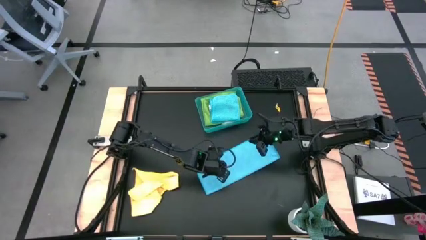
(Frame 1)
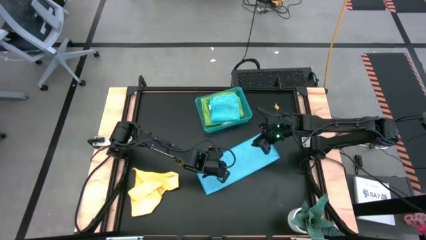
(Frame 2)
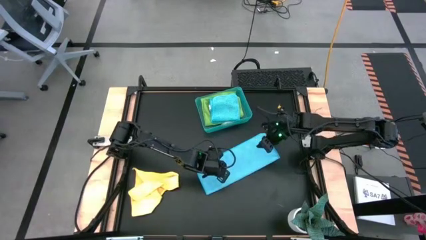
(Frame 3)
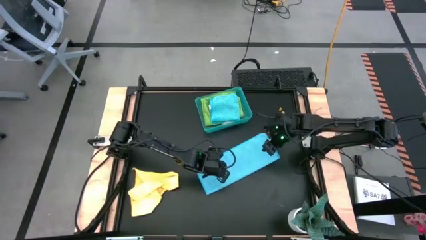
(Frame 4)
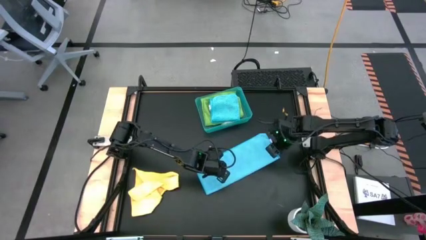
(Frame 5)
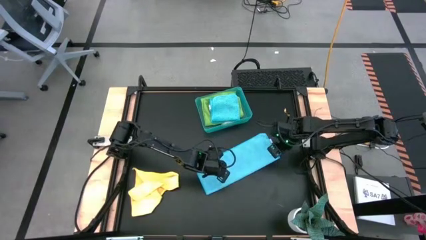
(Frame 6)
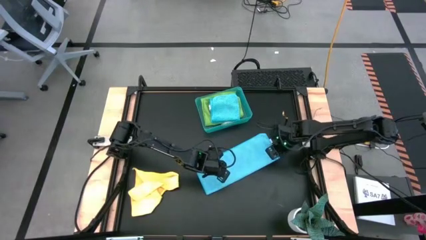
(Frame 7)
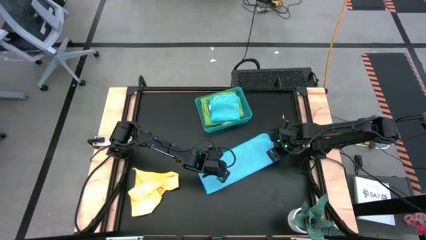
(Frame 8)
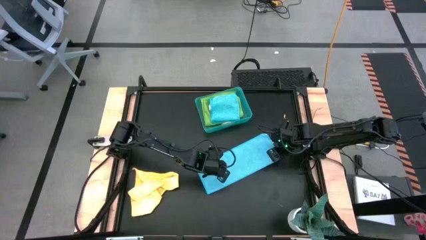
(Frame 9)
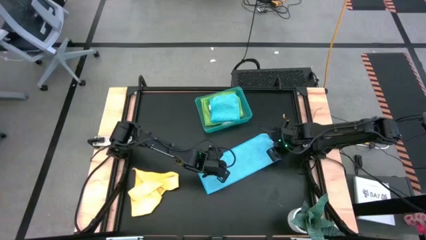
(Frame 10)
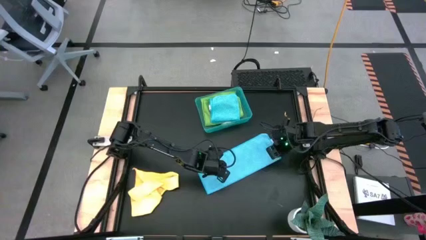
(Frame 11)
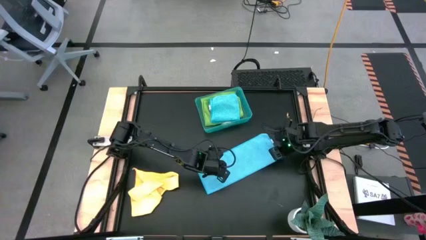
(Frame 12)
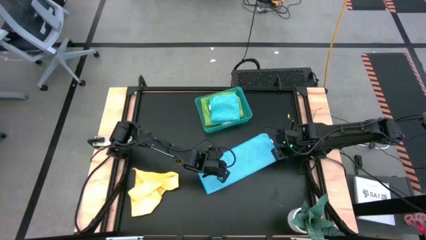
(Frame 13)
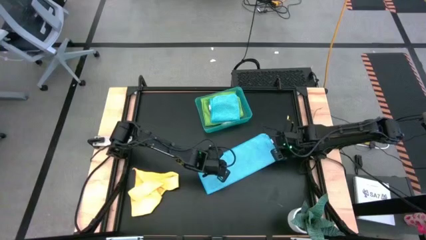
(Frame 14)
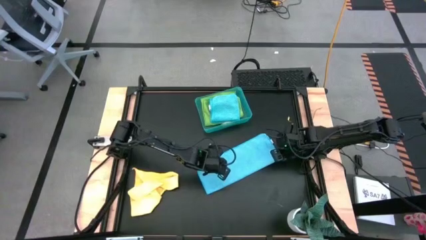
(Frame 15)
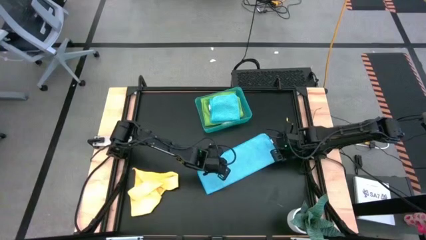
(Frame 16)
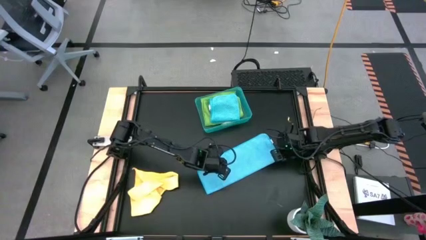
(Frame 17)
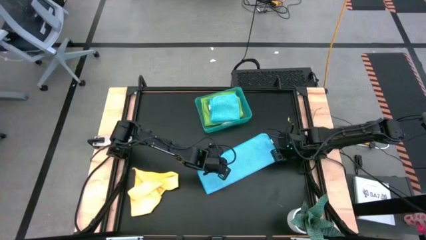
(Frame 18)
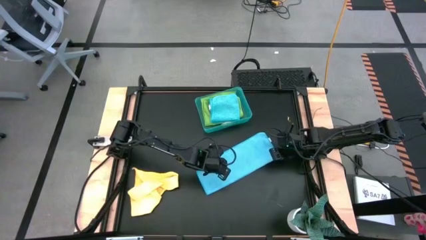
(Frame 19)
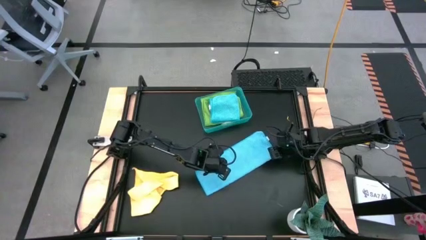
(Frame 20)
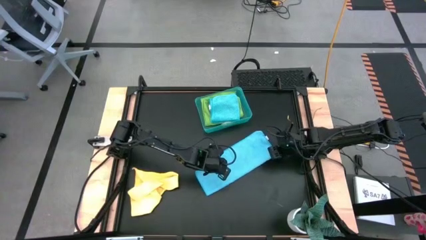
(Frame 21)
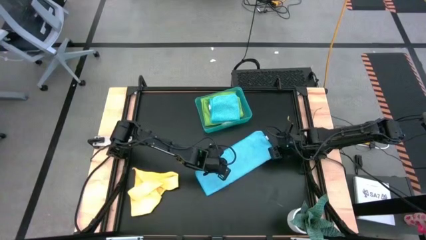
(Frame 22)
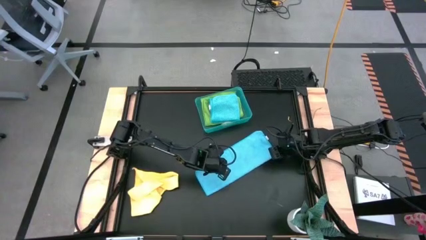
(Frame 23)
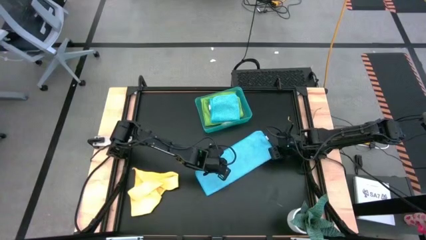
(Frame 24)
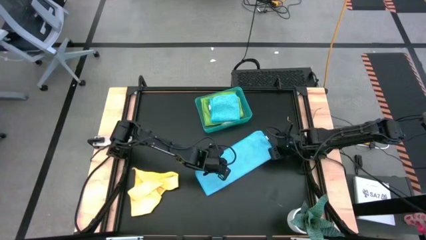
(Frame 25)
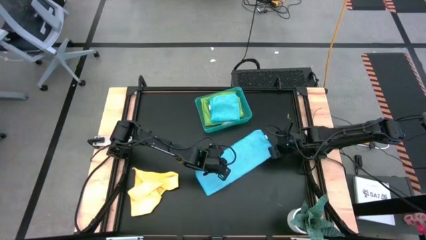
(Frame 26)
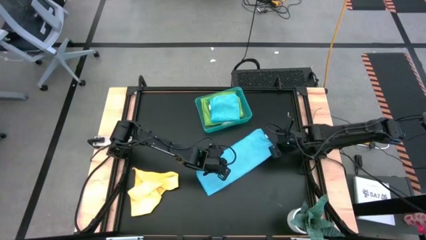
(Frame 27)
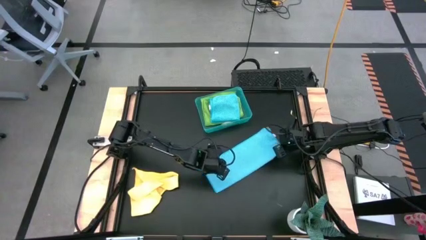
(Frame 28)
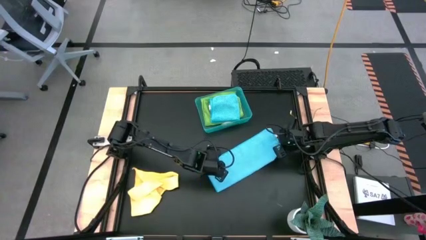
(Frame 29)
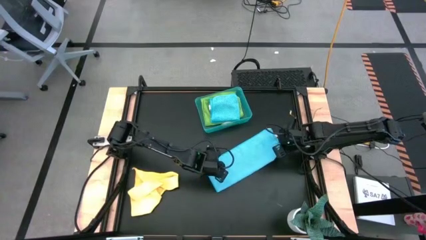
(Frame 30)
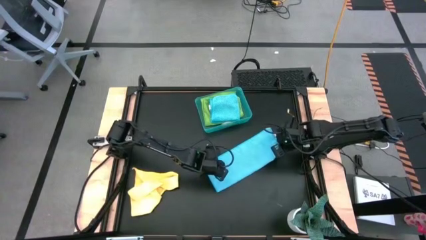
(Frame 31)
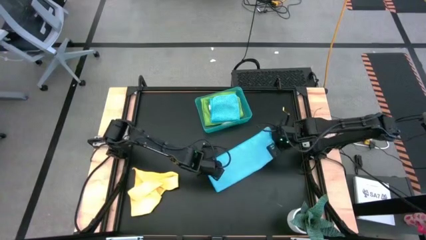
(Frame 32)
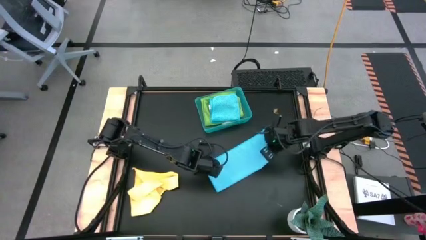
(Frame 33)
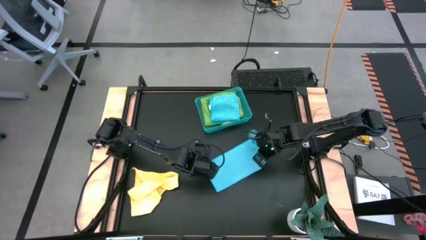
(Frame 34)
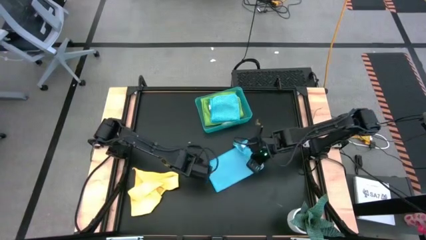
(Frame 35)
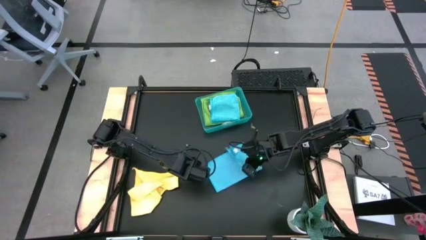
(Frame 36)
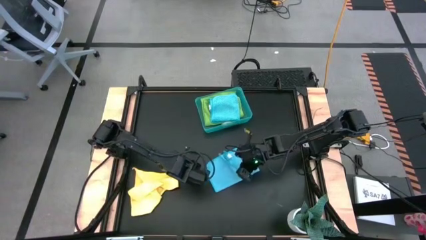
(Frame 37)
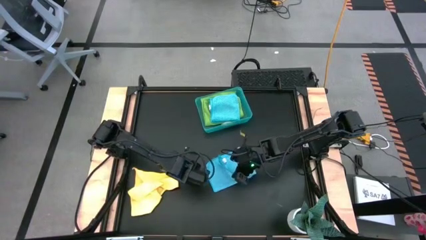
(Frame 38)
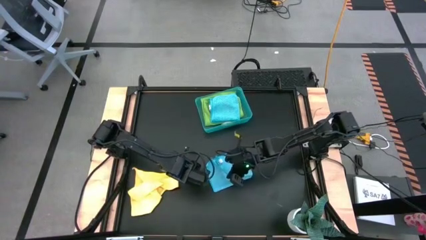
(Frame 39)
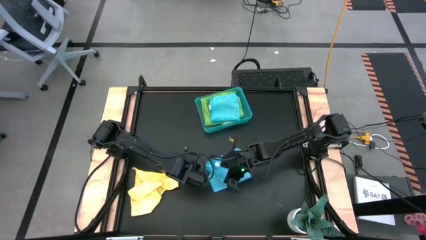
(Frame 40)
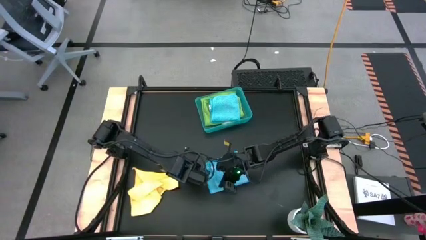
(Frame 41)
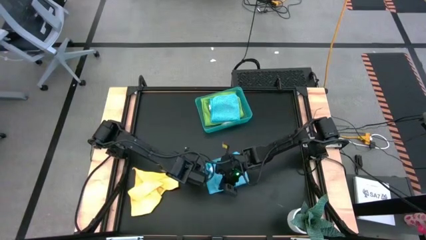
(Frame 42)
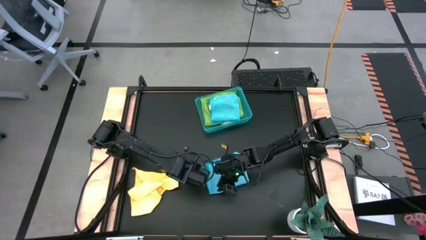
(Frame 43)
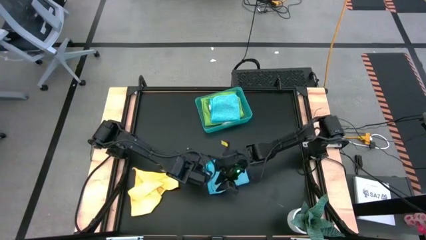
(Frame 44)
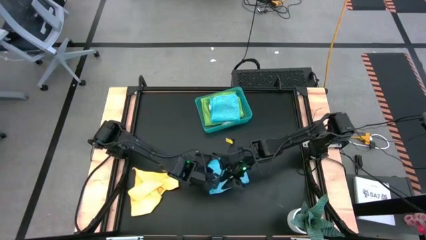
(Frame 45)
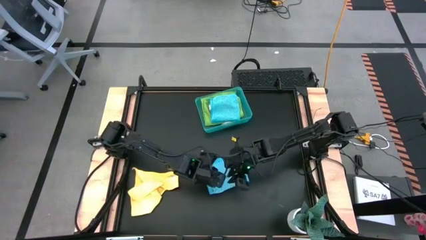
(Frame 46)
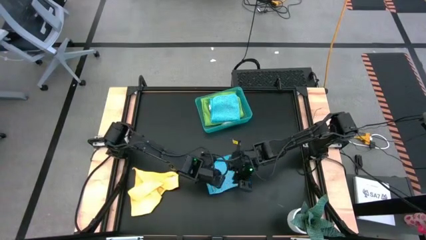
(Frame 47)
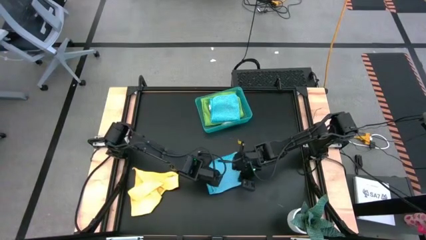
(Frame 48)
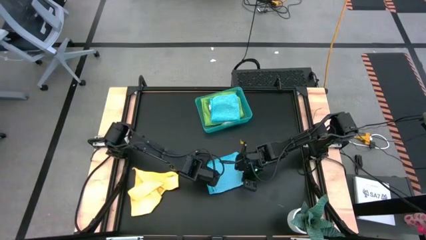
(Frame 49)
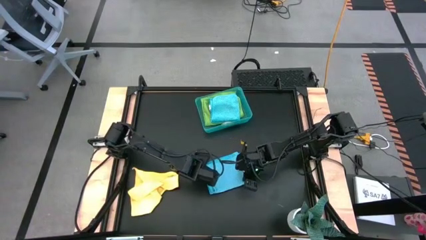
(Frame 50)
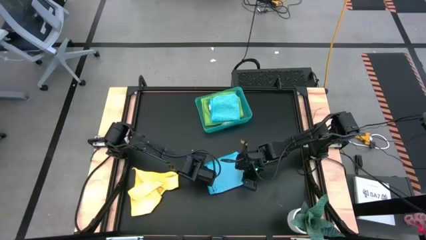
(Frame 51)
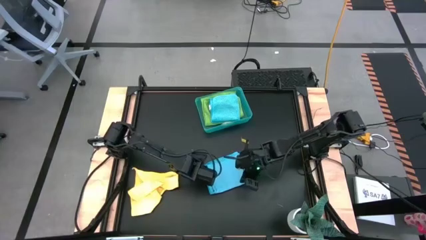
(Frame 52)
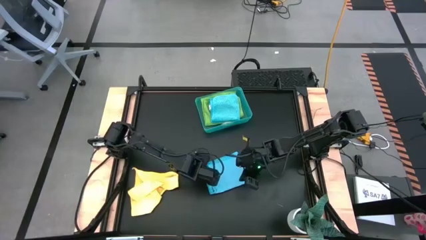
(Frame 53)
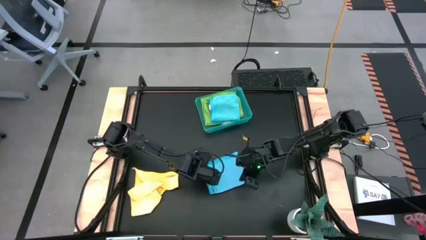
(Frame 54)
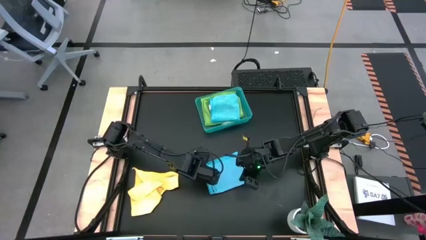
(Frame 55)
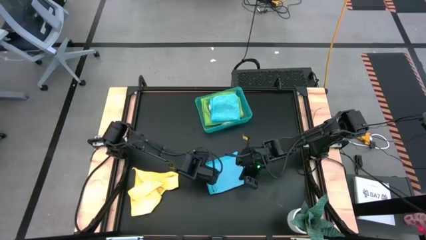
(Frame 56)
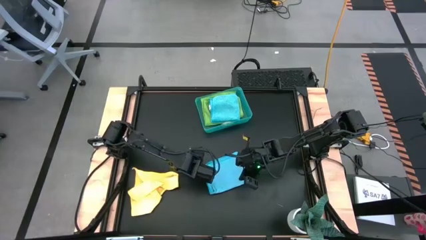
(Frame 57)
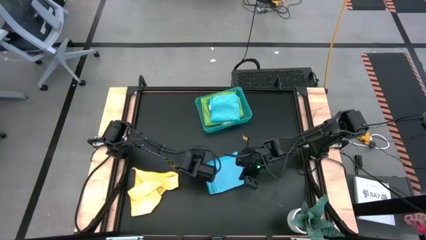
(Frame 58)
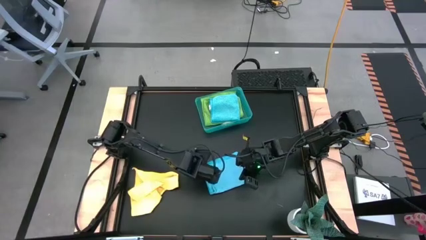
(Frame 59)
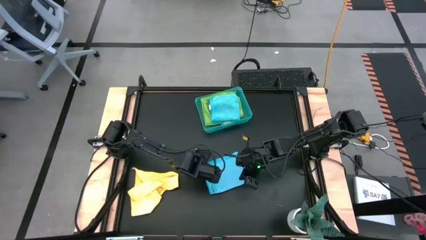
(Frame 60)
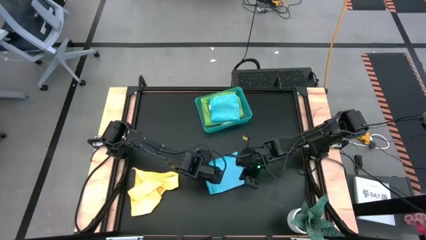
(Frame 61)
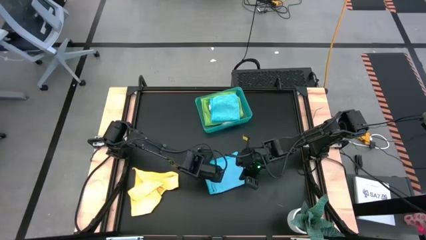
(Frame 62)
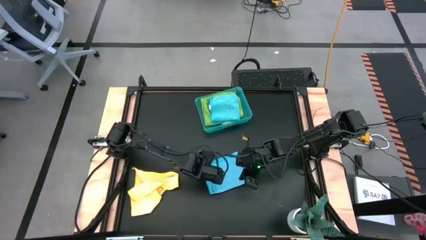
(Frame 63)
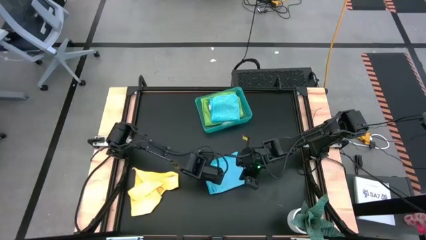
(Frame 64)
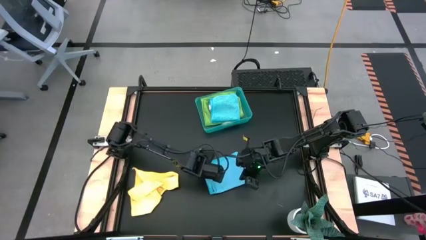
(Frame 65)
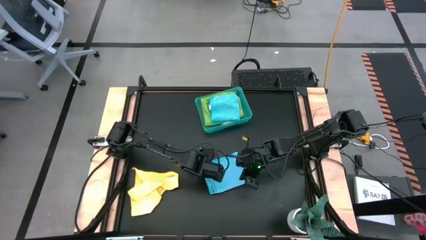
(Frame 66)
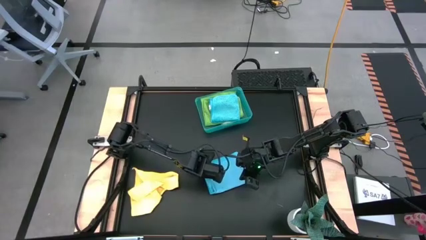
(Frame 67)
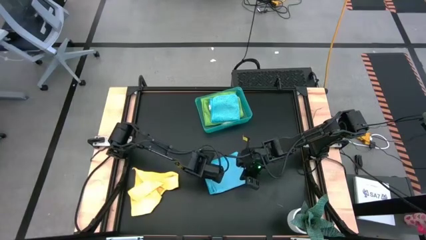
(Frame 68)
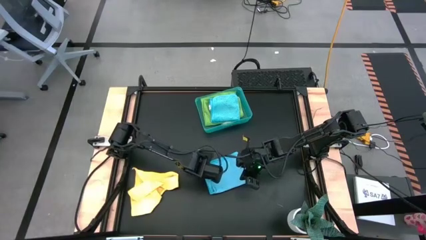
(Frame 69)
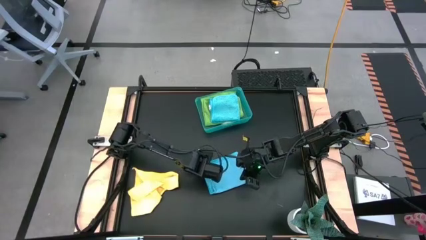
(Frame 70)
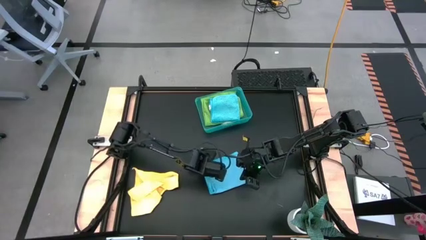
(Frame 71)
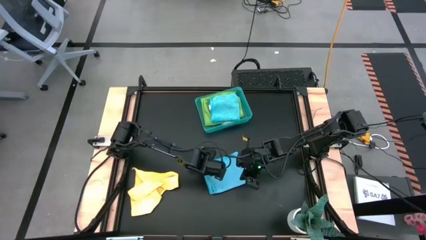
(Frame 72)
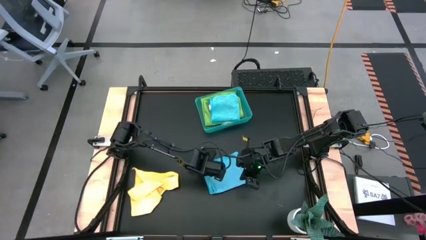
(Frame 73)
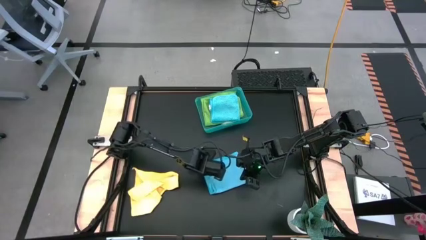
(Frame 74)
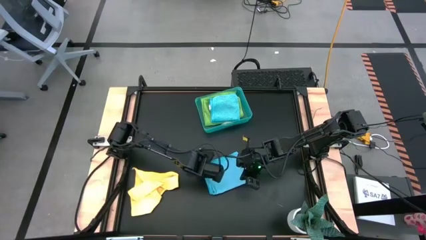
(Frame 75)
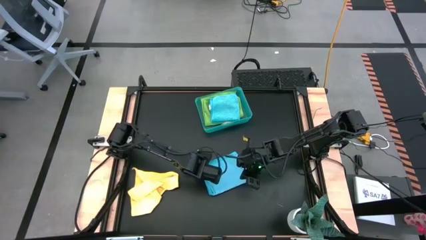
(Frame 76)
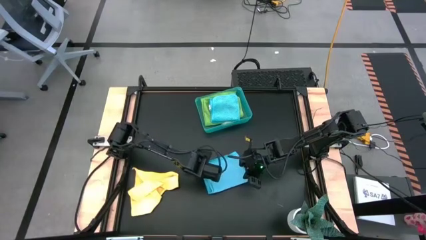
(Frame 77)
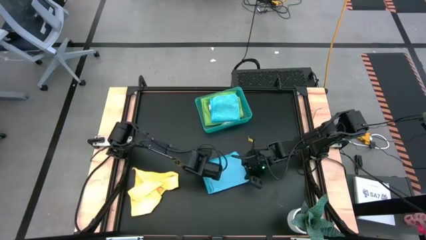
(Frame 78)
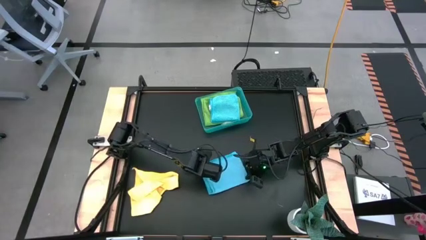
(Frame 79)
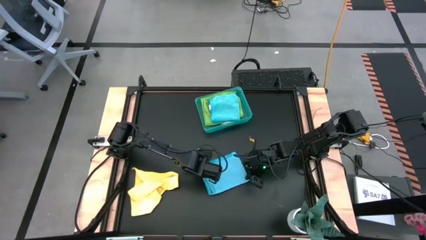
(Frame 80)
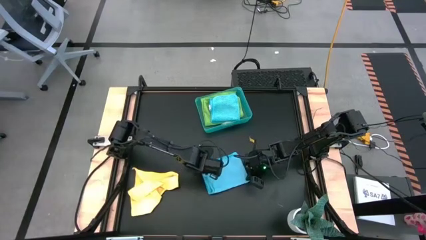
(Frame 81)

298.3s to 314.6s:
Task: Fold microfiber towels
Fold the blue microfiber towel
